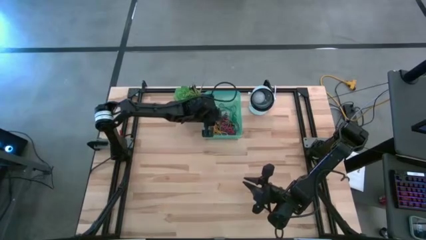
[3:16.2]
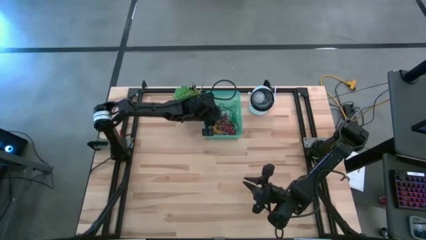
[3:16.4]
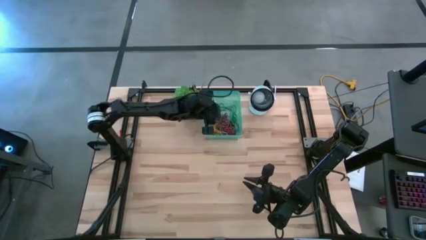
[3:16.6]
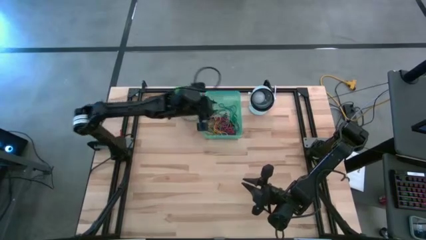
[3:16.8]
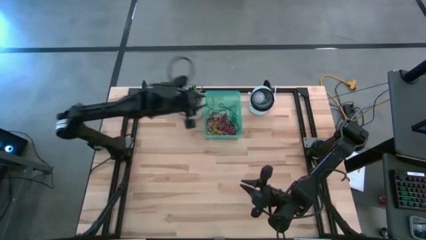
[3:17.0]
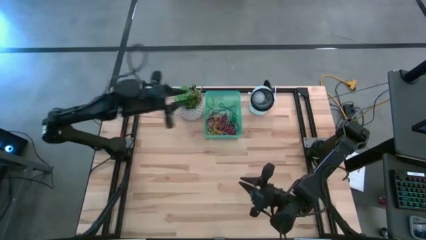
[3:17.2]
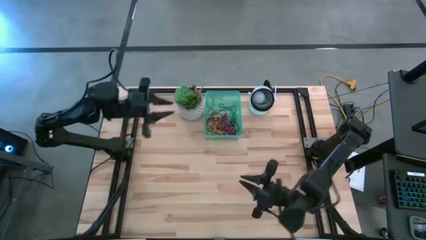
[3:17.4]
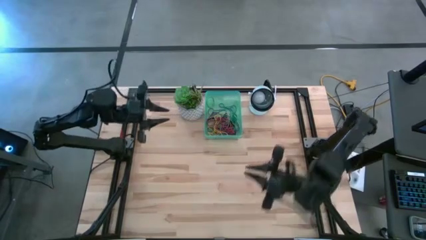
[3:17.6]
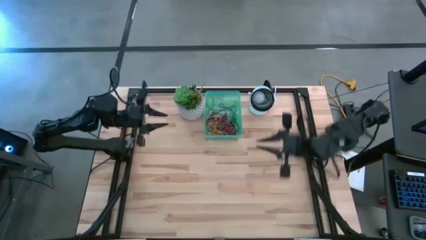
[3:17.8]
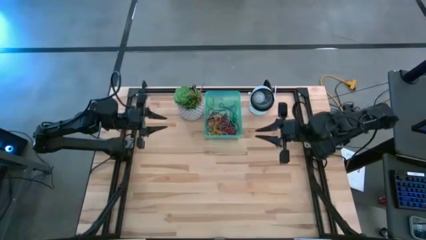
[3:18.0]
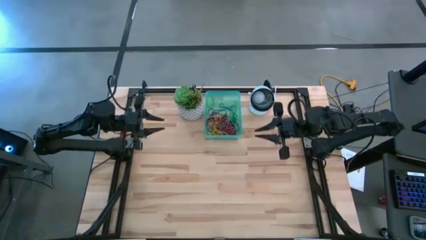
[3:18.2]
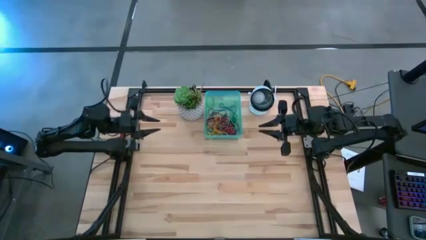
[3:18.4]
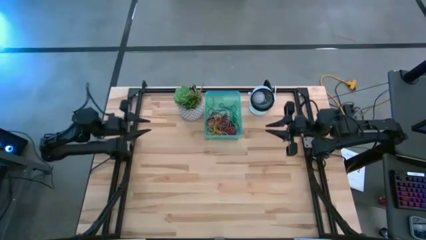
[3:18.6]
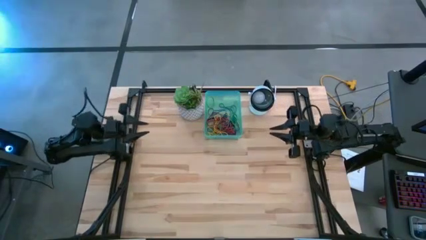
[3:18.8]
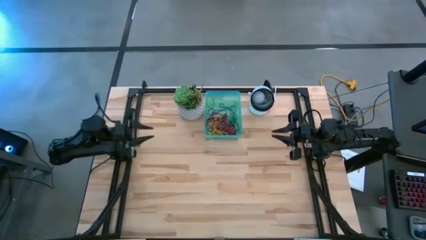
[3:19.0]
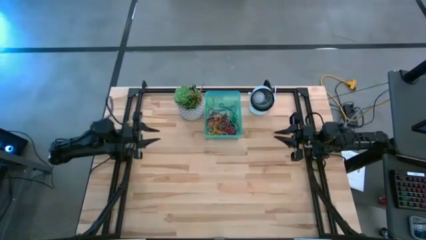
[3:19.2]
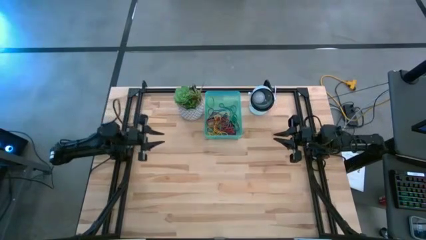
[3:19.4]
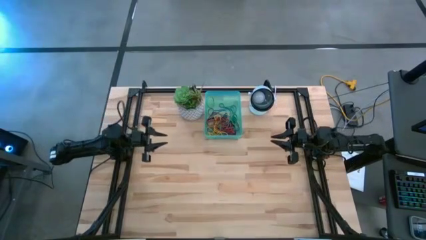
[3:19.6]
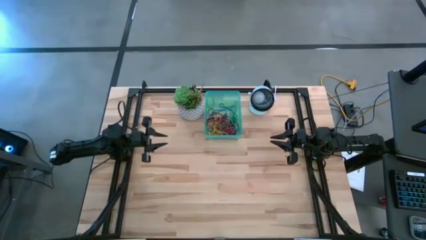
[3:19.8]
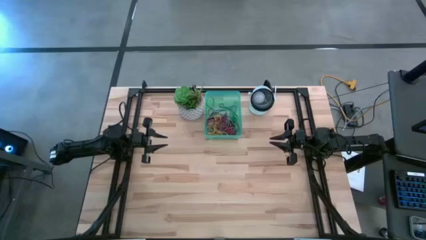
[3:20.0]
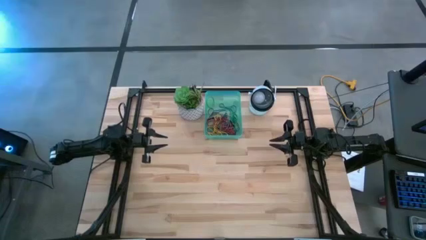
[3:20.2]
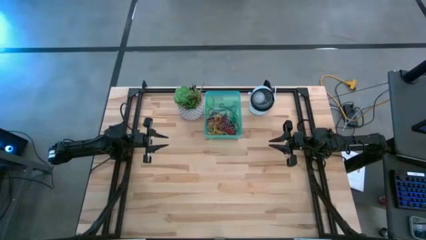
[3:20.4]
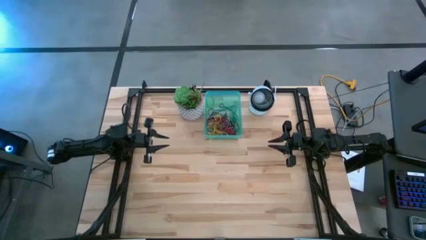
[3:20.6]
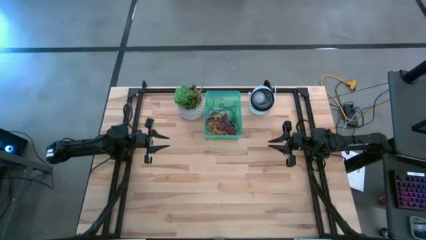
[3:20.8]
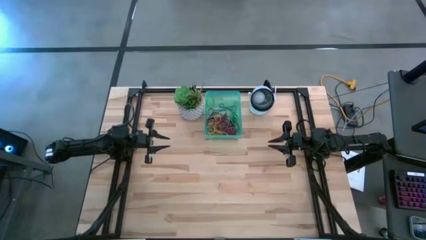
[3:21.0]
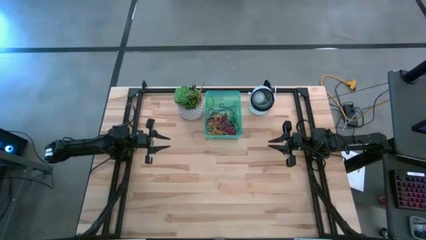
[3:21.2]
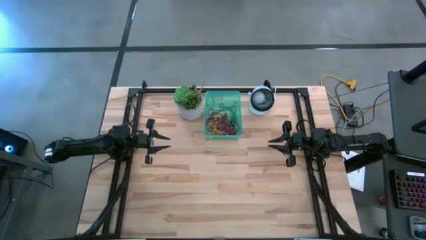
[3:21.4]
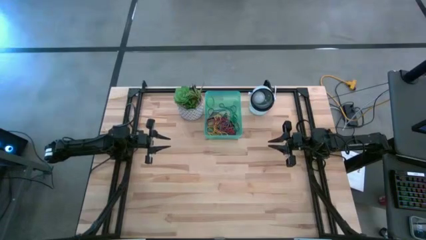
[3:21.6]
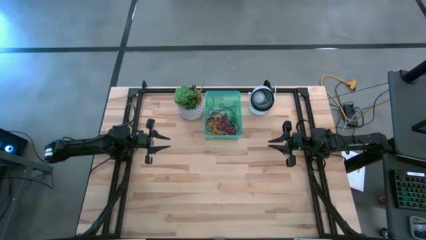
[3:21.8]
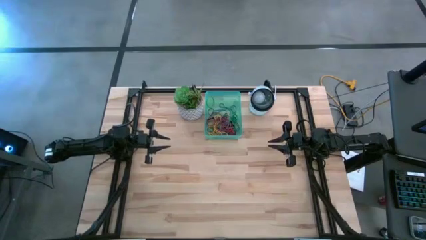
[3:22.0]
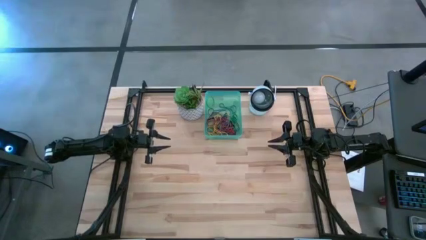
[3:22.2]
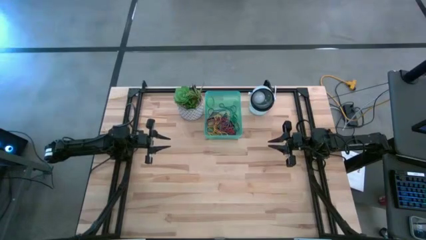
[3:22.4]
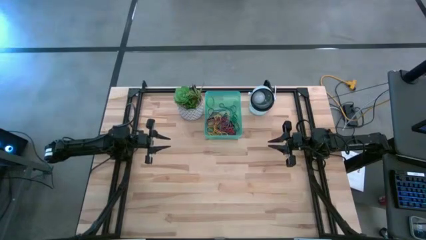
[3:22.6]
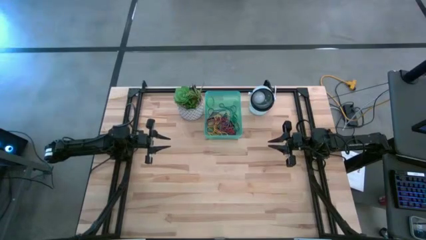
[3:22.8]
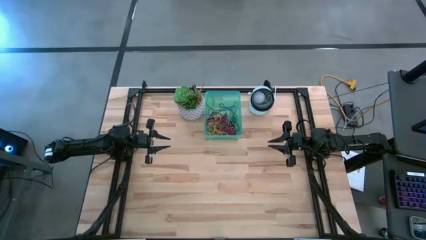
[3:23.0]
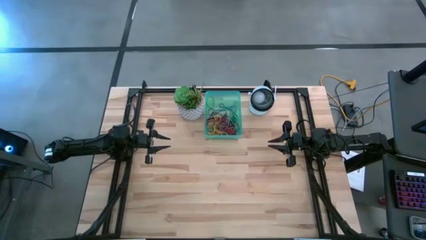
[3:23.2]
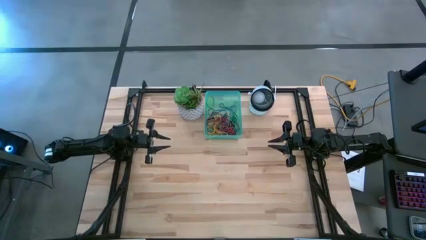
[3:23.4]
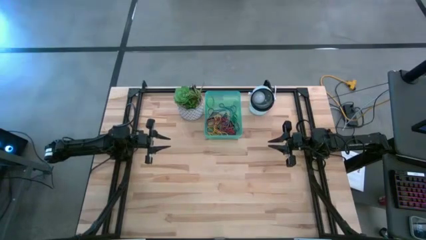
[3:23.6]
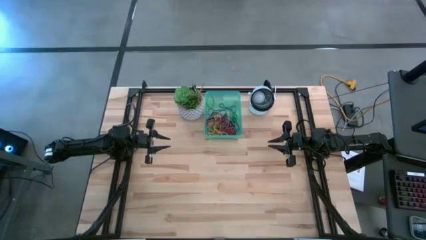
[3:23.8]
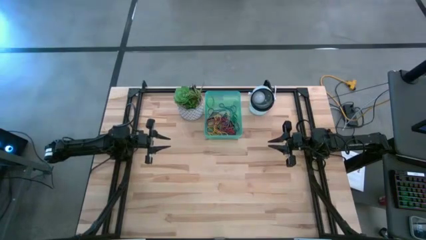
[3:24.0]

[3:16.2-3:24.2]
Task: Pick and place rubber bands into bin
Return to Home Position

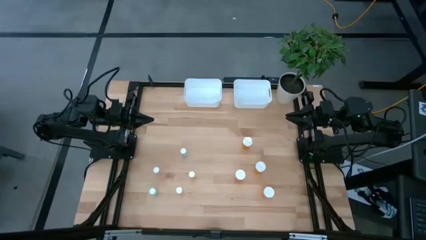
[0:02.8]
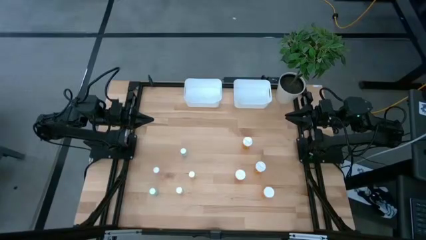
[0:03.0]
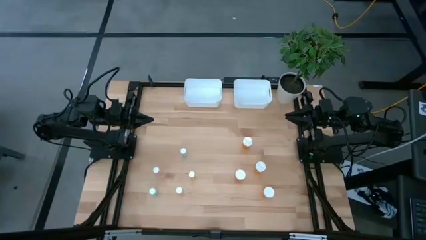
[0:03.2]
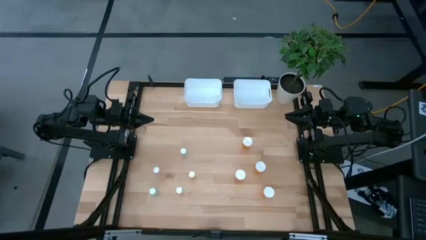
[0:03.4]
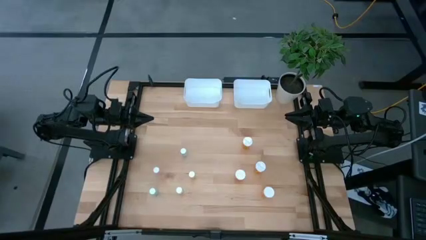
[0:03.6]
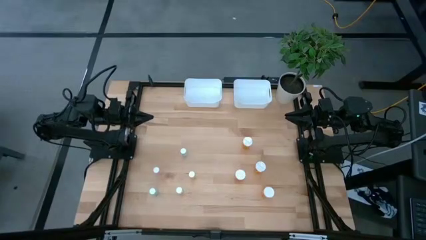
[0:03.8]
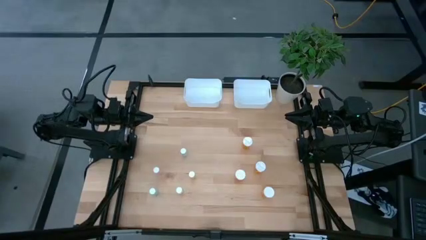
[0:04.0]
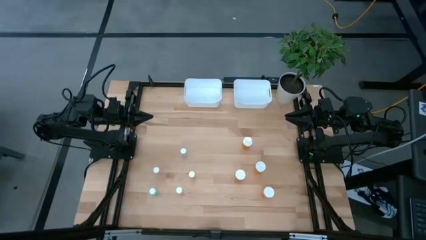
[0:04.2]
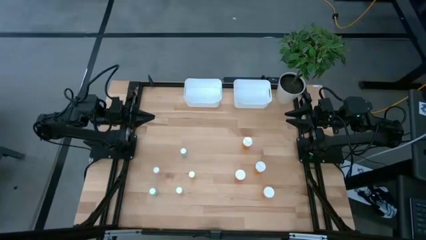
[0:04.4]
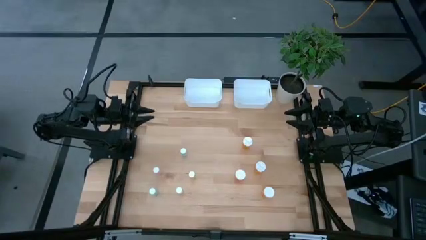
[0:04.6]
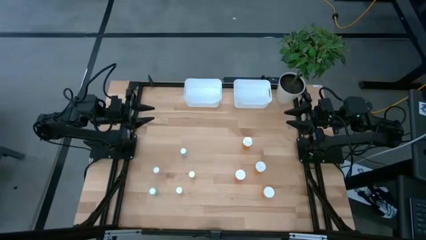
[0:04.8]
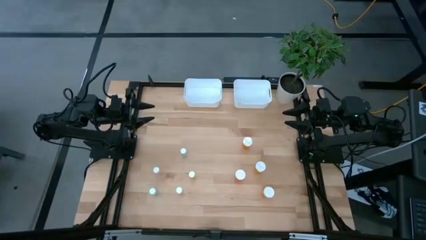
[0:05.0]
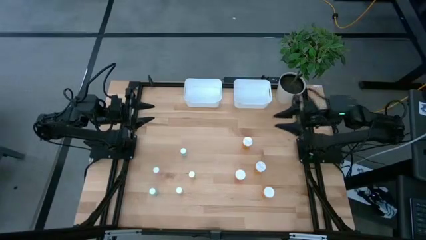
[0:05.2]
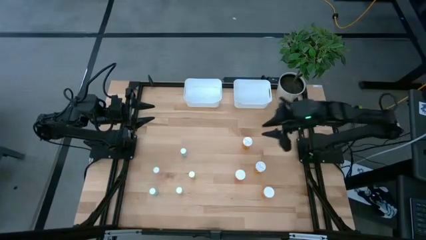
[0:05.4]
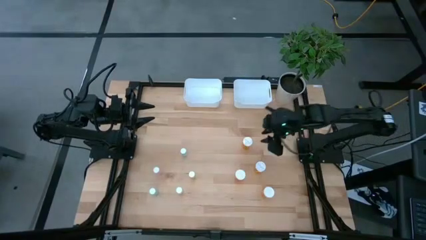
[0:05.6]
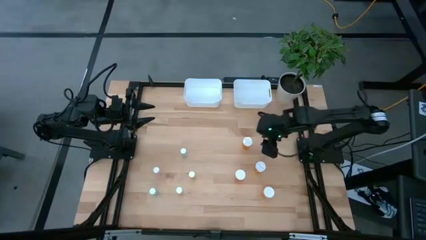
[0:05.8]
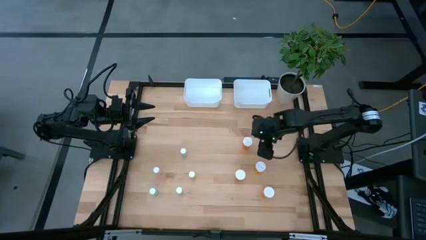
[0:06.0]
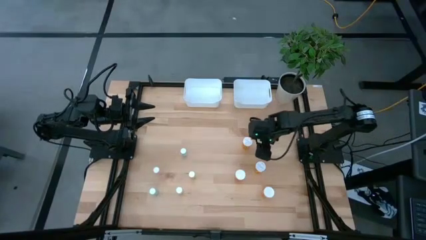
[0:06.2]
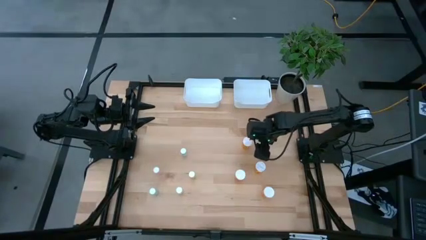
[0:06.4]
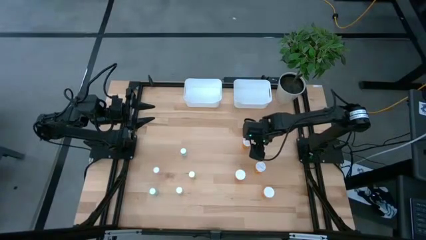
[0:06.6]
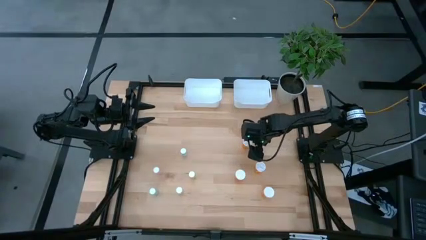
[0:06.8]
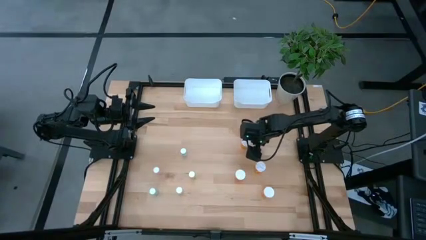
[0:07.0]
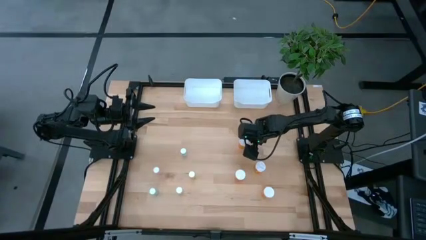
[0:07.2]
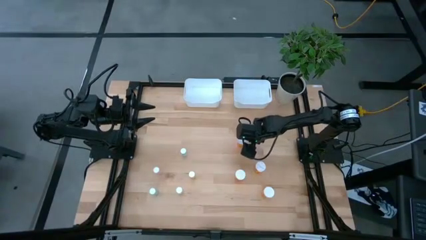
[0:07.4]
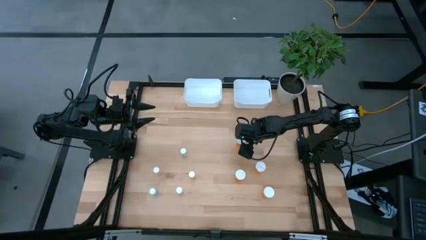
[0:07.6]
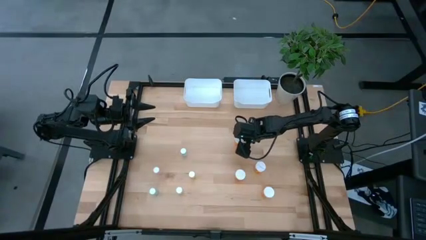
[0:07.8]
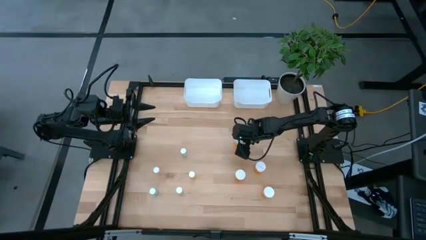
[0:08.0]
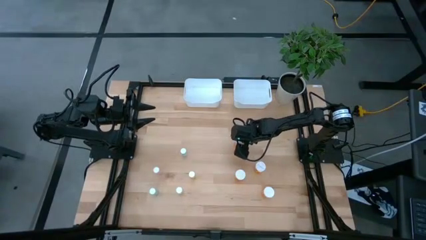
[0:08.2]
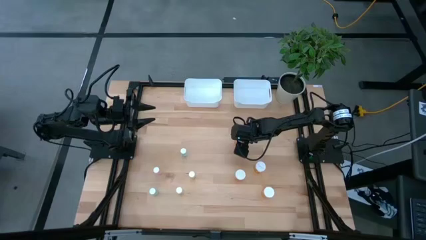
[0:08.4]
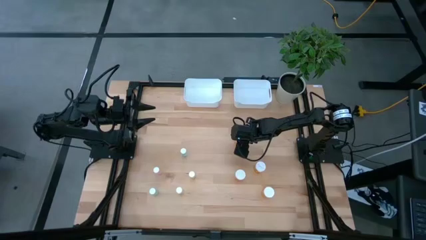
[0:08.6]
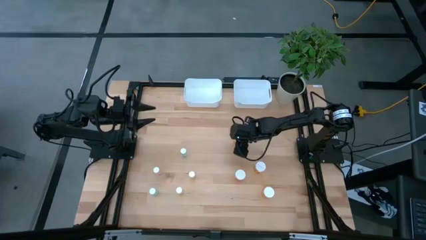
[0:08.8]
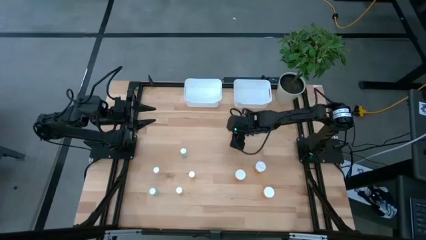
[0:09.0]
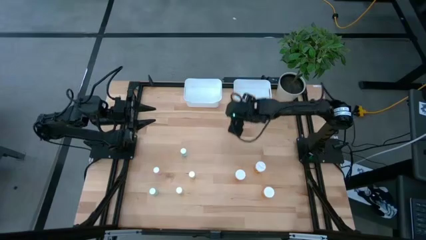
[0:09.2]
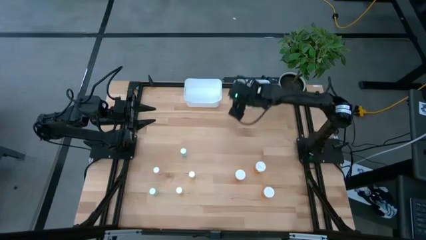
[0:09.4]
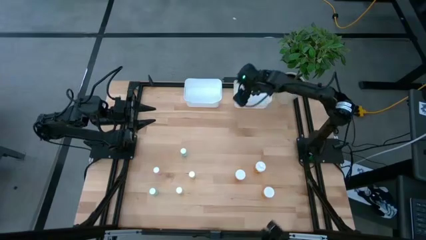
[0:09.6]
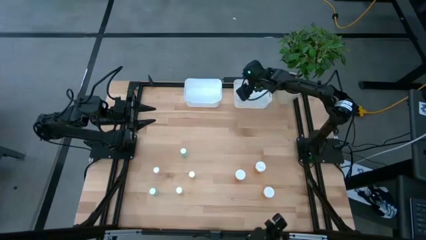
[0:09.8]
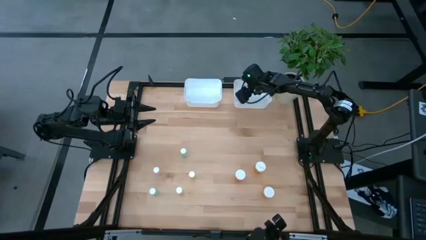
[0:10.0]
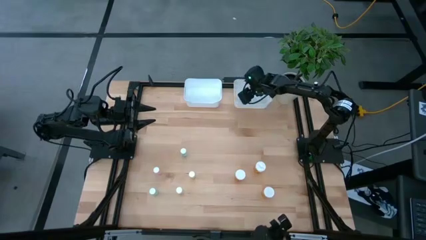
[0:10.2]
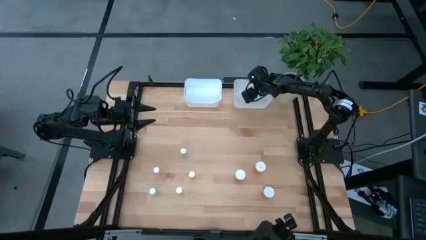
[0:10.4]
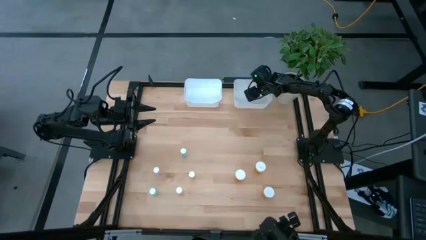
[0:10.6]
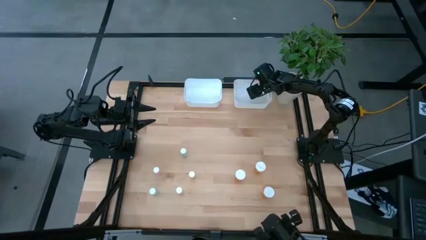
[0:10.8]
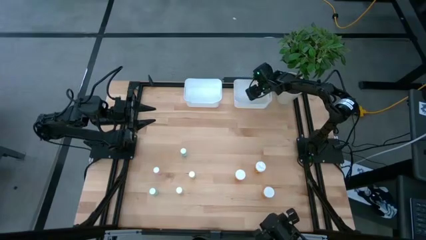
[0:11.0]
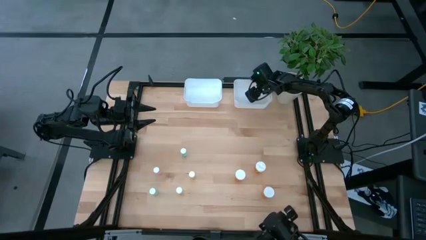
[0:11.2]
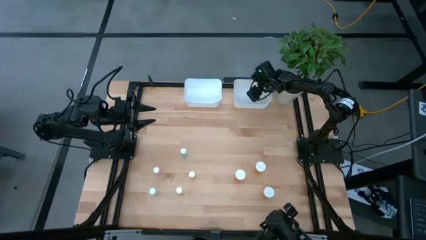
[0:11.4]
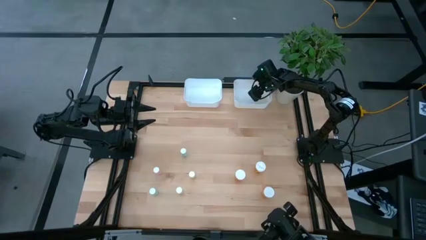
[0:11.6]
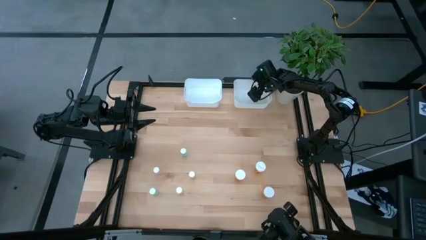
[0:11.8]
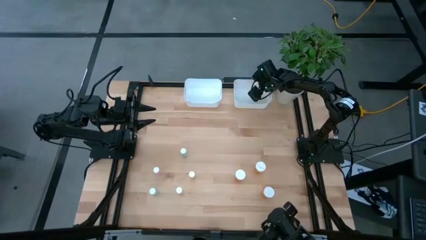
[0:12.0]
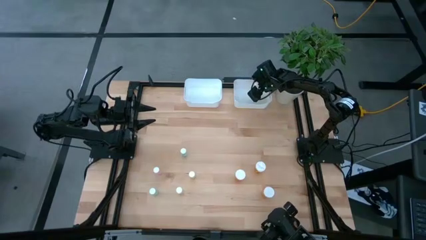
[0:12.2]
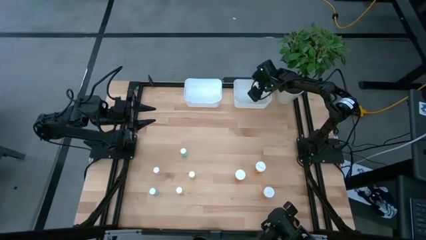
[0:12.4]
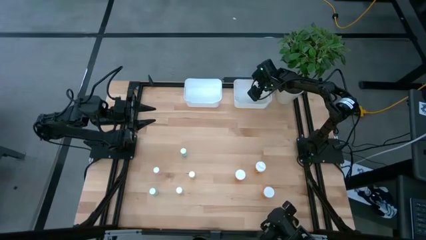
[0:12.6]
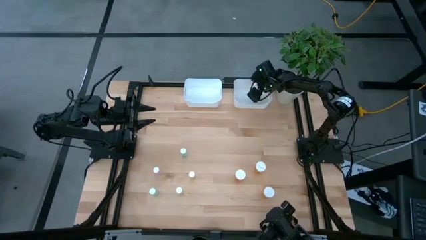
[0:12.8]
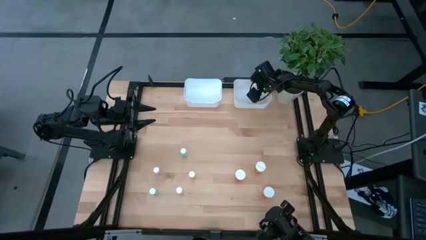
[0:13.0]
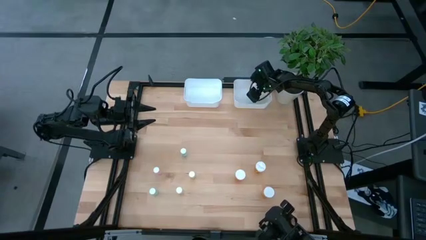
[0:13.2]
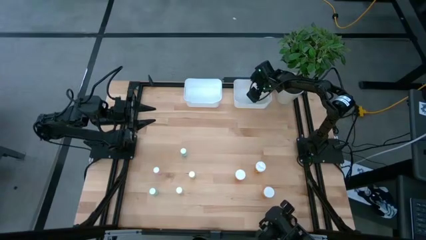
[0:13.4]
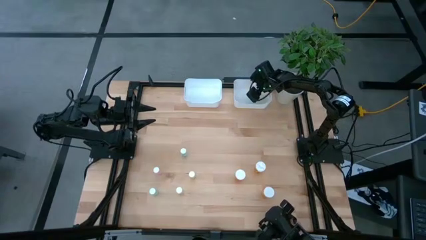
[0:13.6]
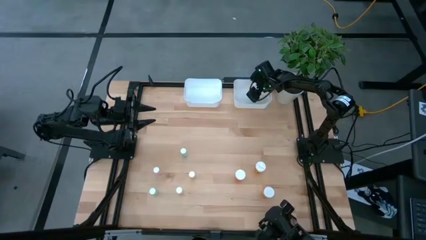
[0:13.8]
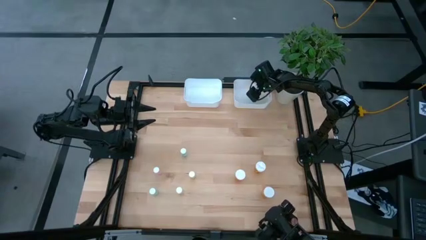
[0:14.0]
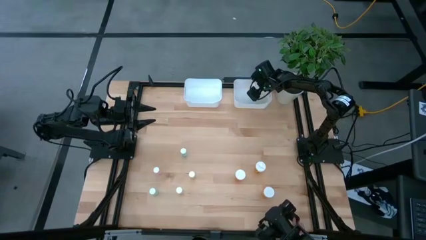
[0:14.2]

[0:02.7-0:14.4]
Task: Pick and place medicine bottles into bin by pill shape (circle, oval)
Put the orange capsule bottle into the right white bin
